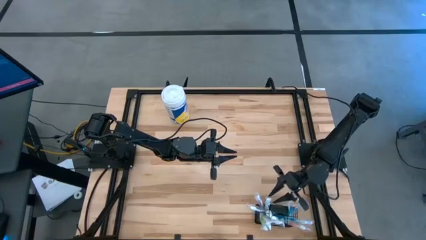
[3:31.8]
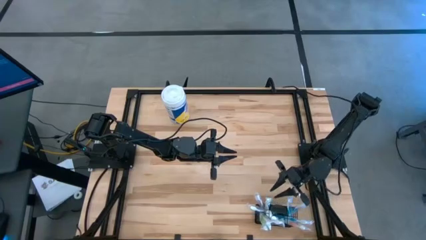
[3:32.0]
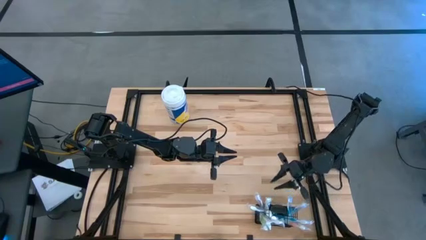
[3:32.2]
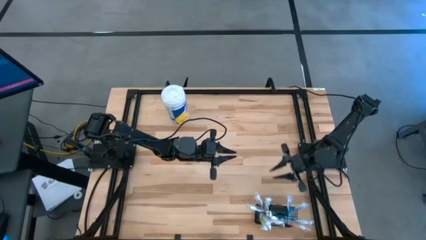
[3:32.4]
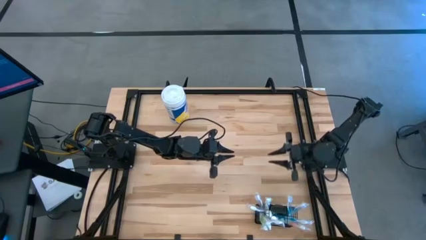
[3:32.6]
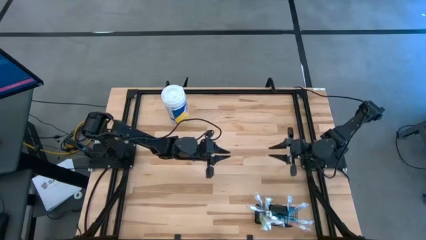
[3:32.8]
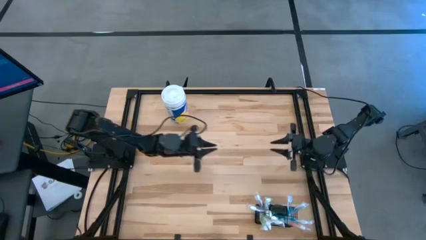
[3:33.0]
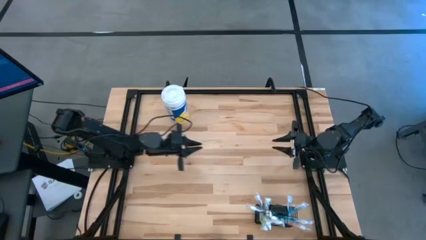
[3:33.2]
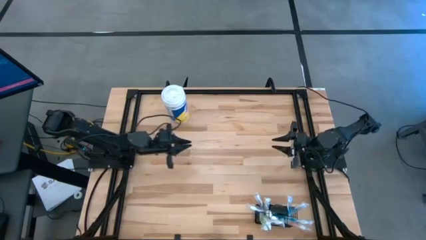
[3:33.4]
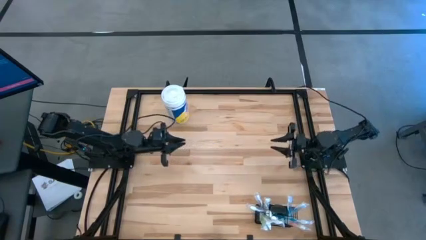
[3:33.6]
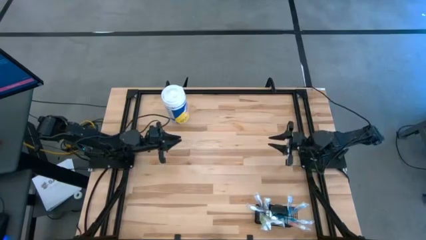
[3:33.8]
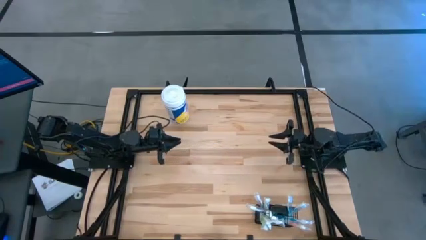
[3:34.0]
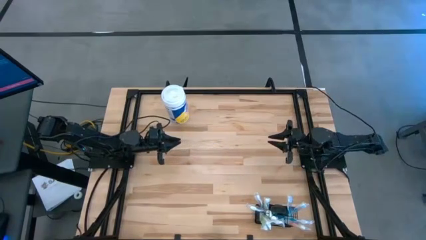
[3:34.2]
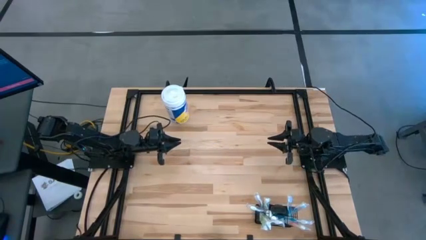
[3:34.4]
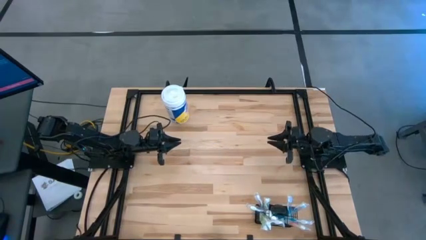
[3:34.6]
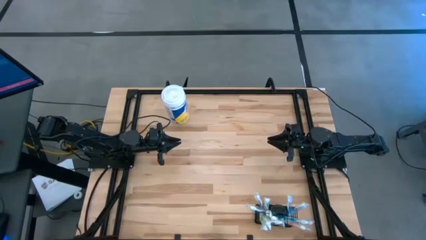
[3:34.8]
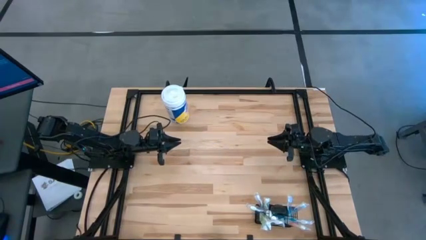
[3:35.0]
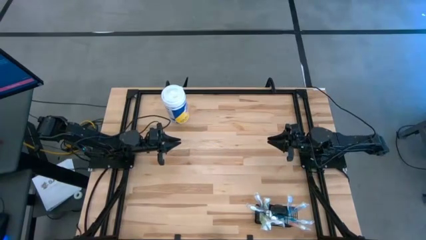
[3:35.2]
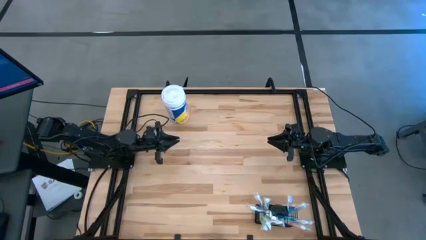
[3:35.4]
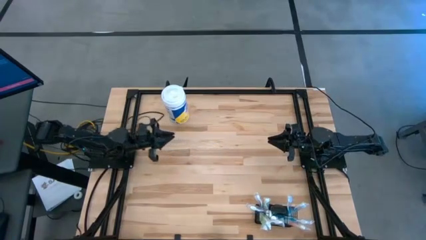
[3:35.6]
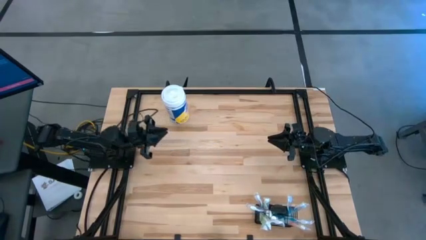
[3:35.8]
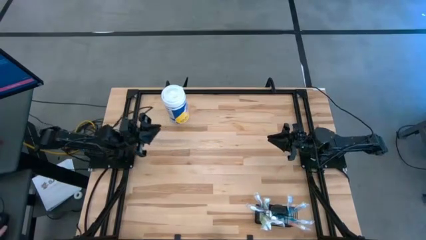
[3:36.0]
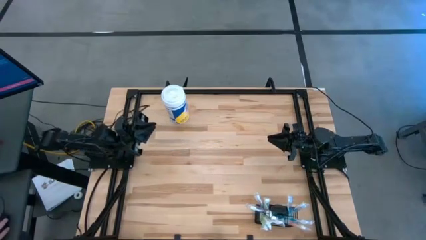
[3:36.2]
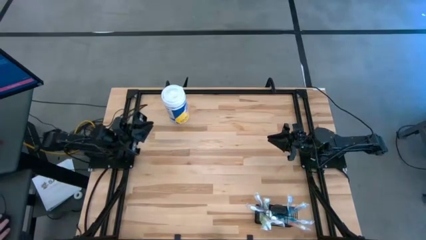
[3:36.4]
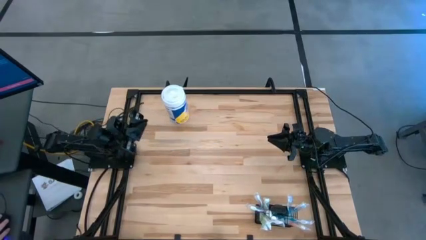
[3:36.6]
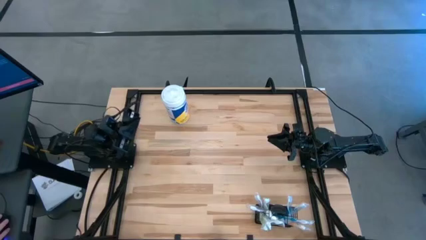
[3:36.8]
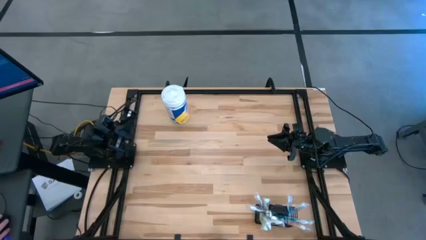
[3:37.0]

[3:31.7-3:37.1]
Task: Pick & Place toothbrushing station
Return to Home Position

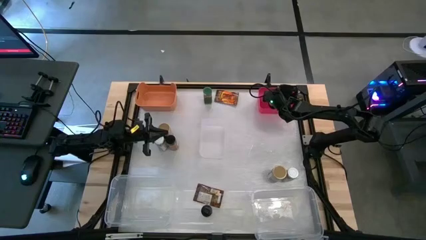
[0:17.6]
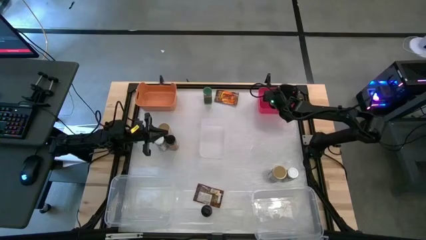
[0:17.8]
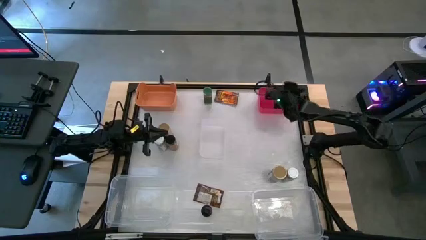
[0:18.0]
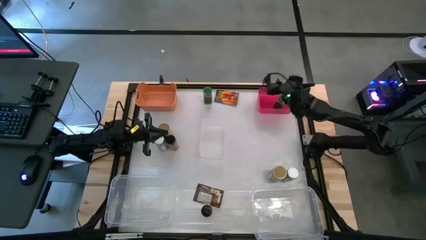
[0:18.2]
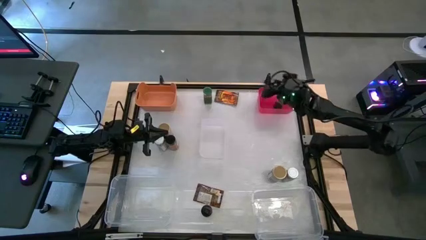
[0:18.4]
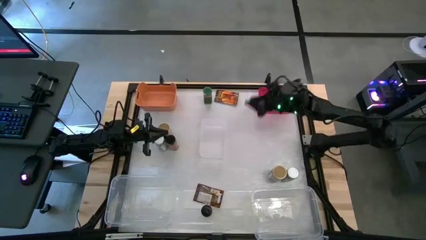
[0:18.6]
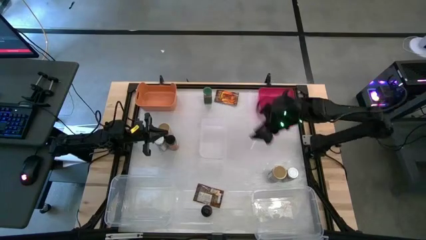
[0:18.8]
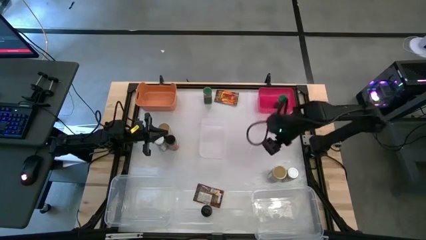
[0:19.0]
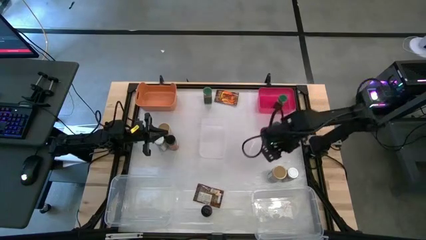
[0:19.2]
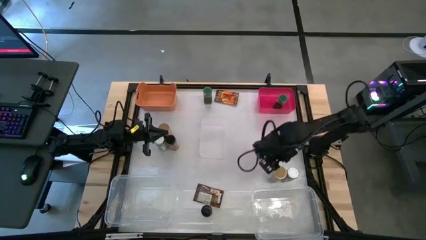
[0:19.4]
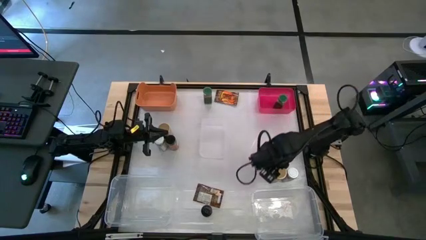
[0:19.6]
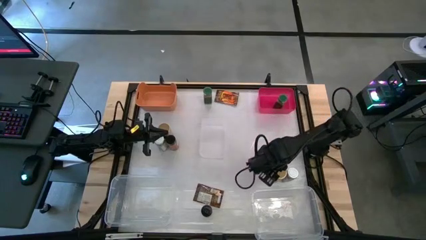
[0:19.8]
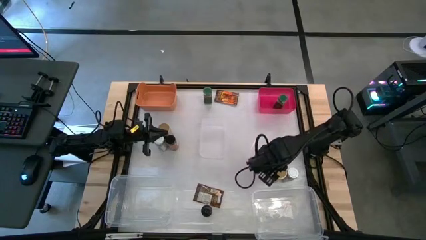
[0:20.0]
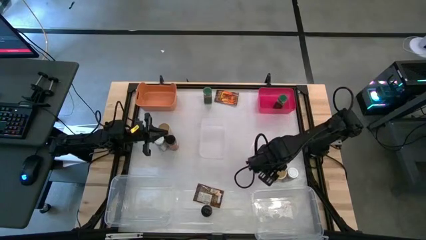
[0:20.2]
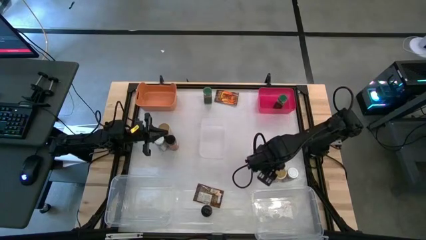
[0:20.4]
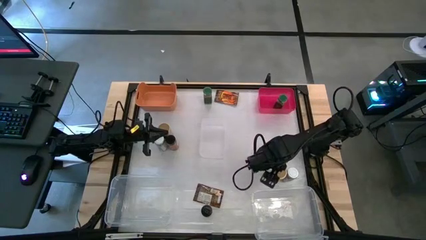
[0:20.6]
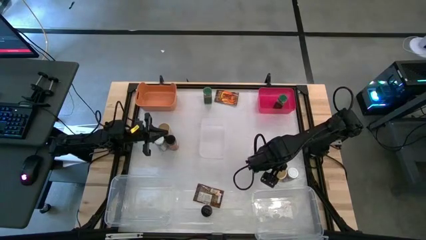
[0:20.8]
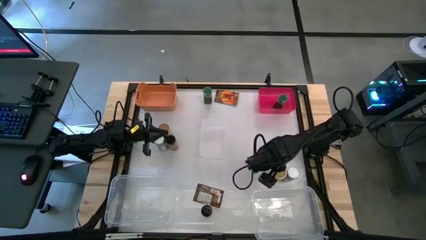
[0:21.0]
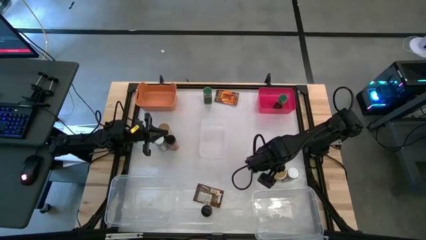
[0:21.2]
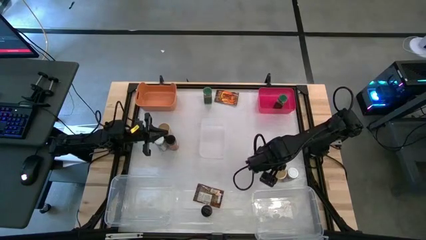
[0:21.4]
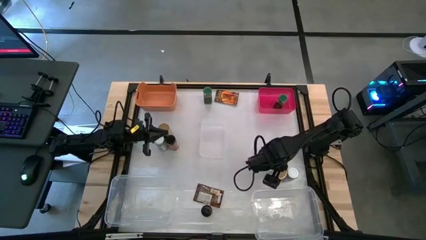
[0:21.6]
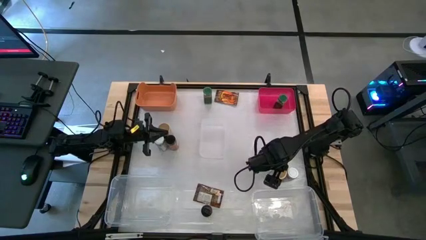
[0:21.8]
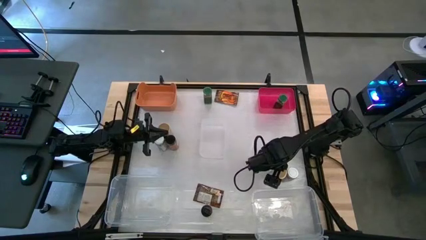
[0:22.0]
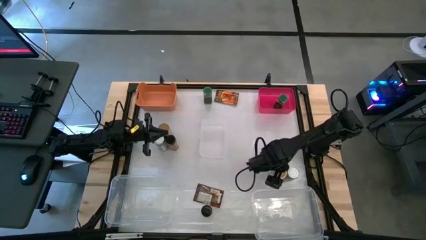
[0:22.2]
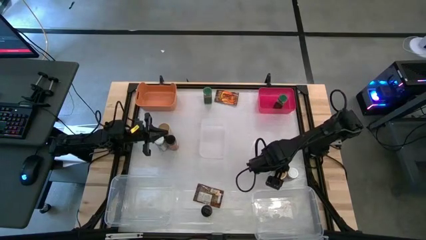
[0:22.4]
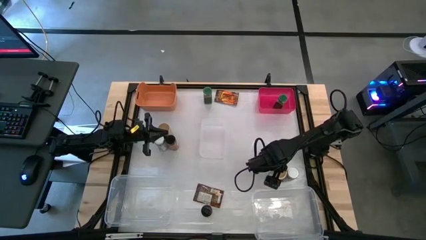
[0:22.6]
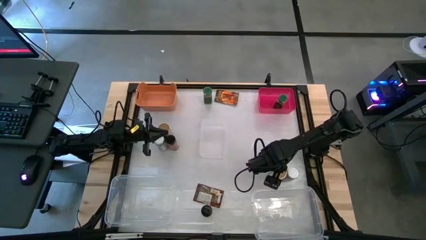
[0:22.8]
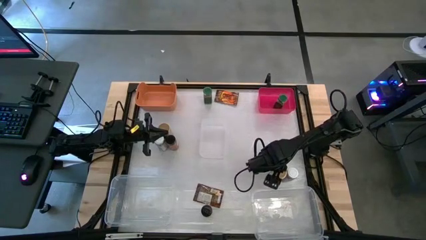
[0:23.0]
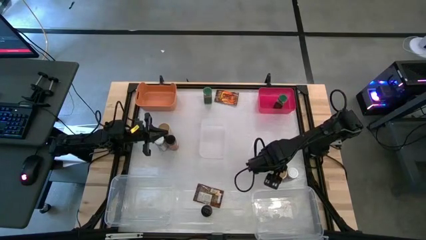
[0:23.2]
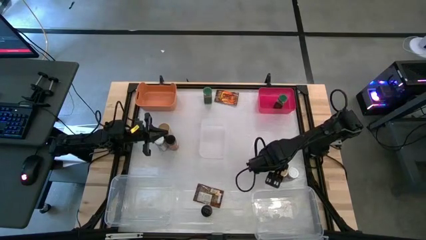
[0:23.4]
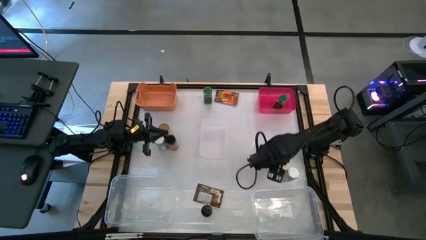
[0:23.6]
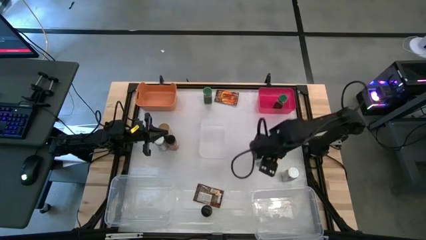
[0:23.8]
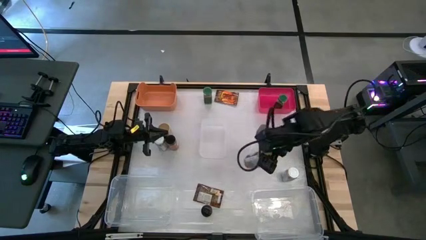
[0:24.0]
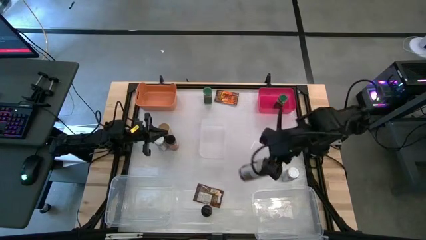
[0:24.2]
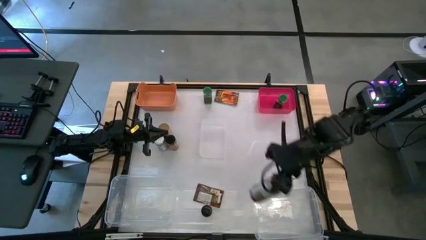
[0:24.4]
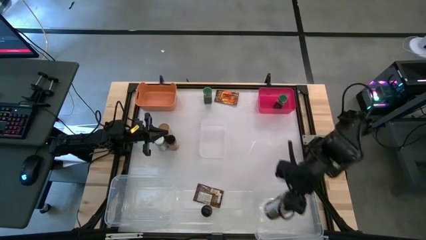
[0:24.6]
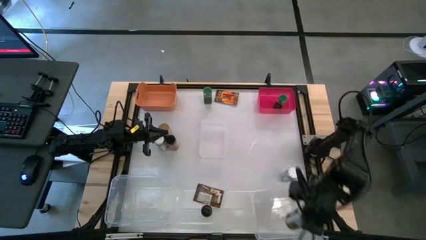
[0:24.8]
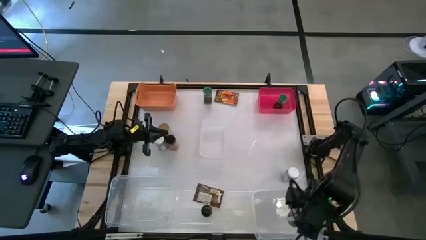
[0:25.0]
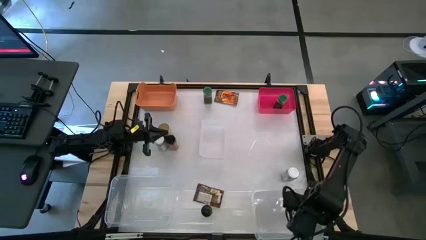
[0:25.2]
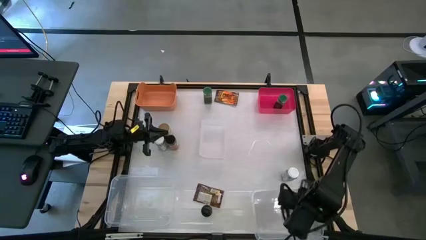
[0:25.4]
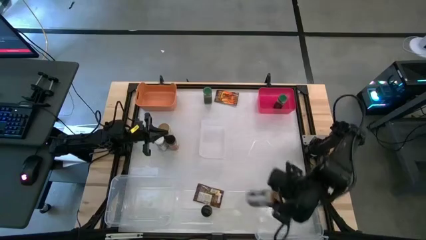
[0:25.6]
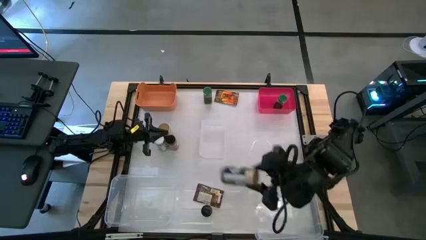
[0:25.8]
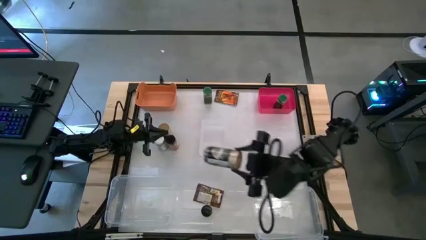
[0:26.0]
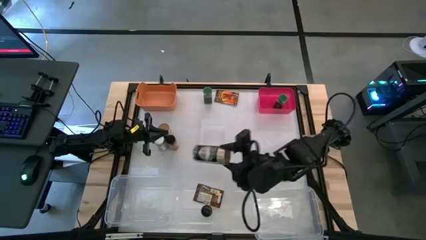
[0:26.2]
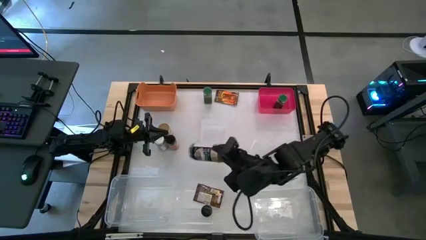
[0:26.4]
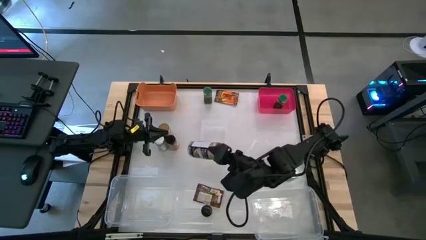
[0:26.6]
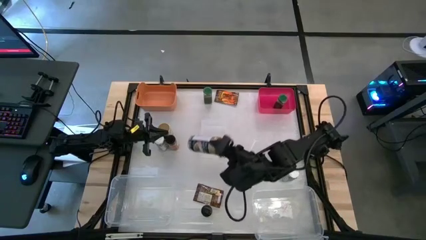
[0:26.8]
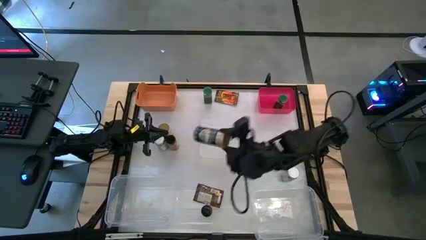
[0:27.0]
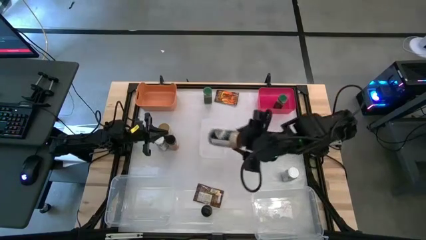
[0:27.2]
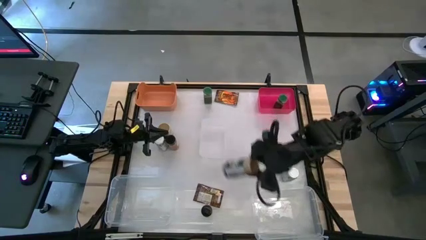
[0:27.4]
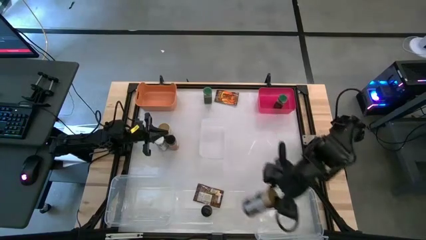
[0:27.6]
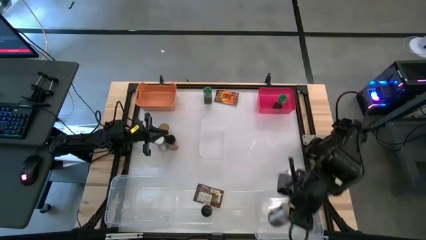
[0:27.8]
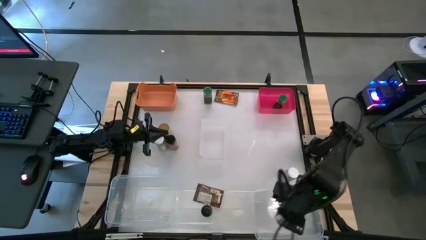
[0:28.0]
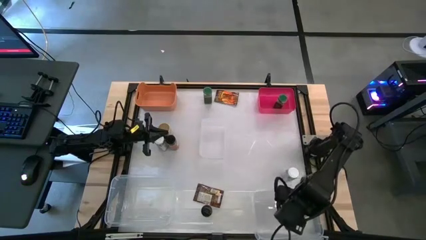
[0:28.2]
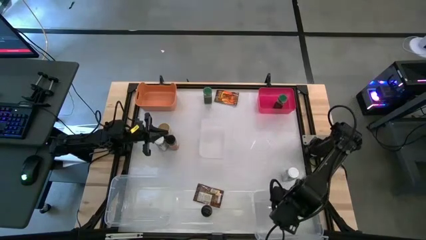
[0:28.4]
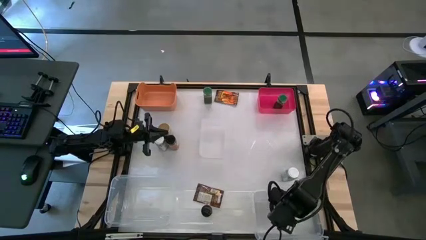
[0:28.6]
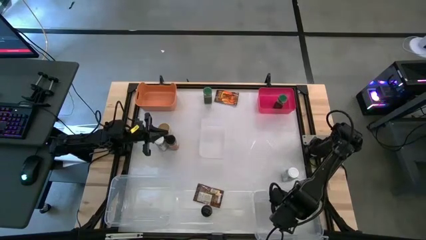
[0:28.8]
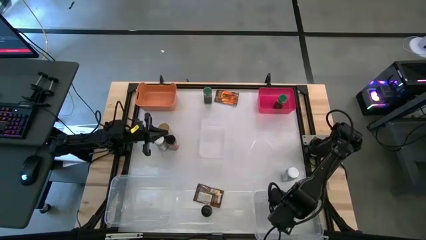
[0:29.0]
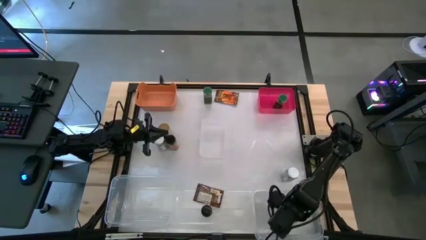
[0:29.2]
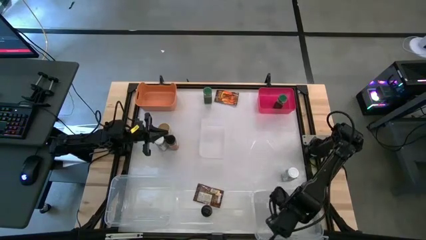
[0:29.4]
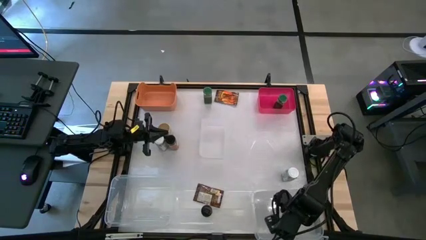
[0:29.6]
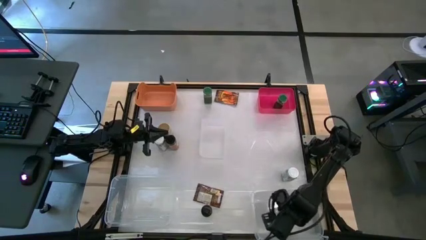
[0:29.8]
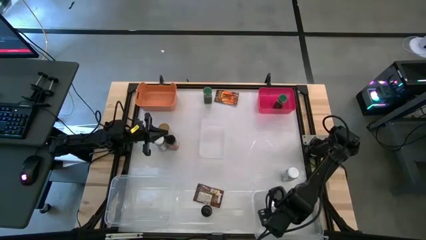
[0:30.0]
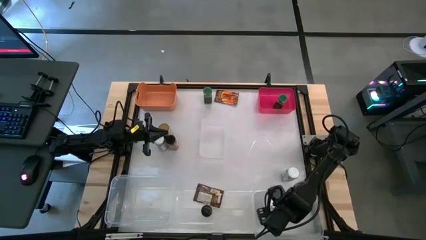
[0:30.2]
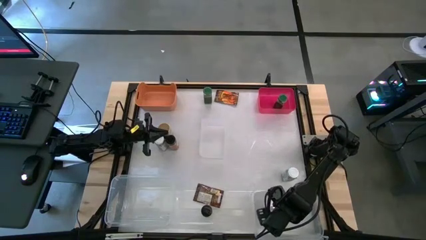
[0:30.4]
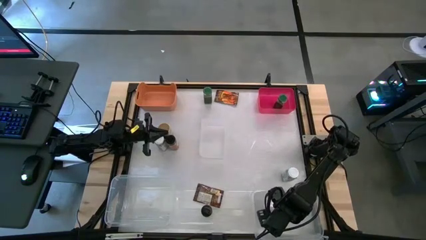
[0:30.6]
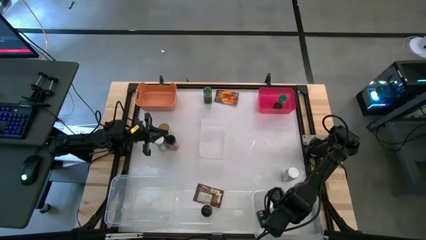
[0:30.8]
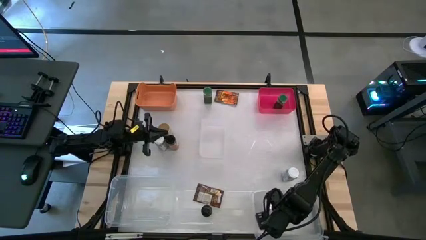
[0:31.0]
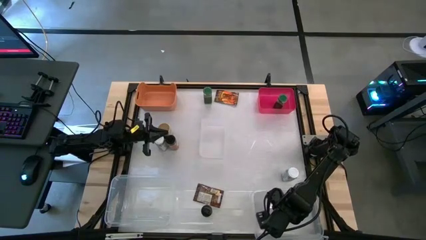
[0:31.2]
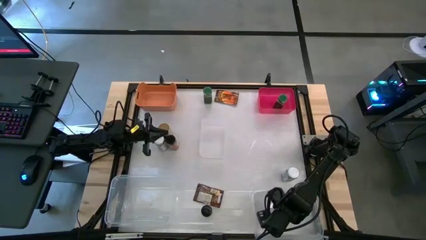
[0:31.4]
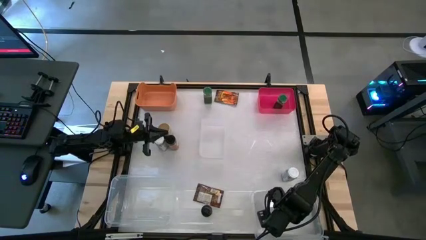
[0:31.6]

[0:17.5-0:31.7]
Task: Sort spices by type
Put the bottom gold seasoning bottle into the right transparent bin
